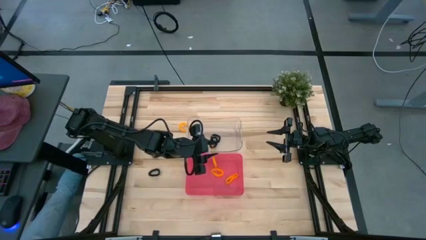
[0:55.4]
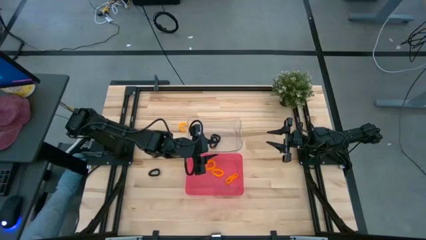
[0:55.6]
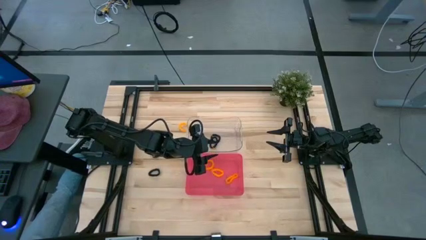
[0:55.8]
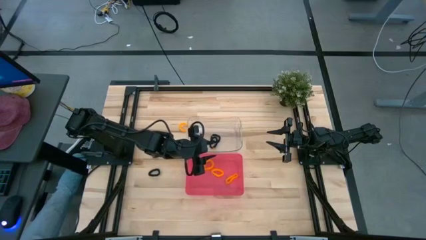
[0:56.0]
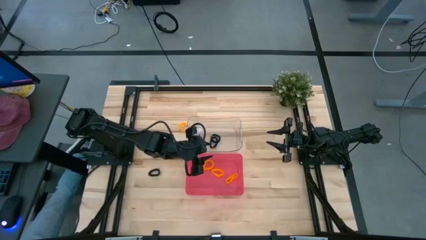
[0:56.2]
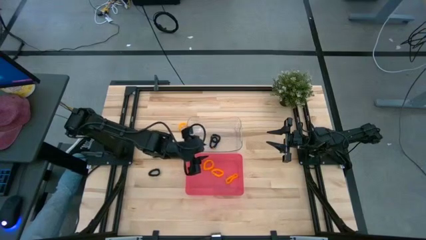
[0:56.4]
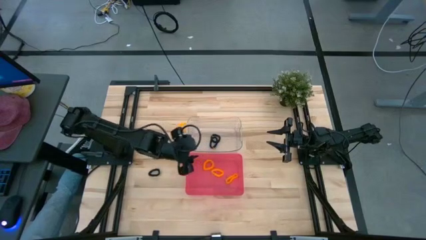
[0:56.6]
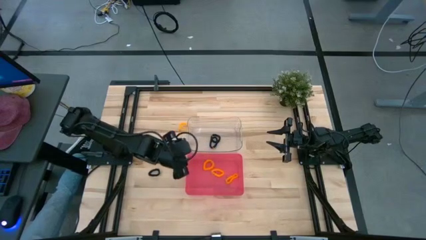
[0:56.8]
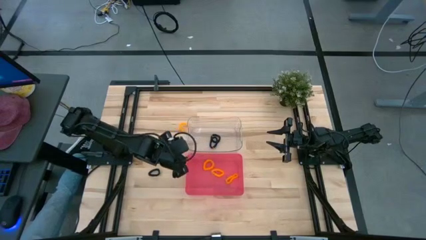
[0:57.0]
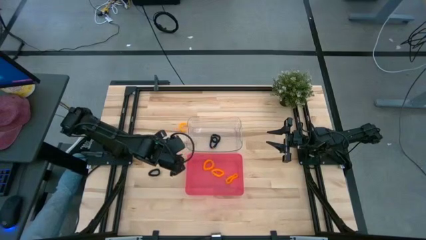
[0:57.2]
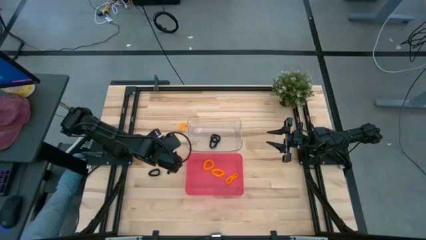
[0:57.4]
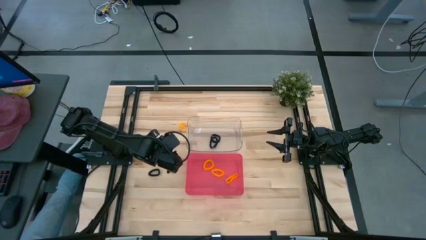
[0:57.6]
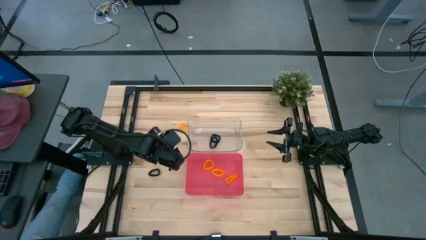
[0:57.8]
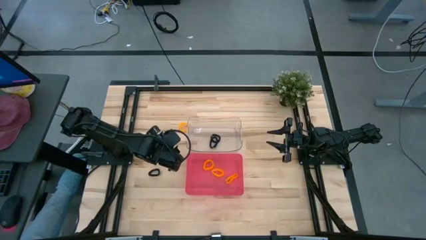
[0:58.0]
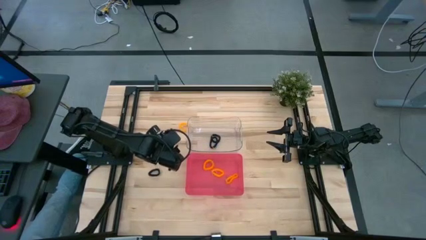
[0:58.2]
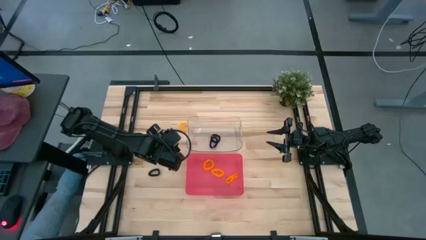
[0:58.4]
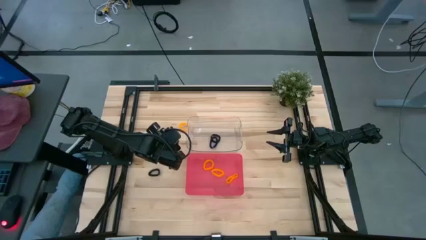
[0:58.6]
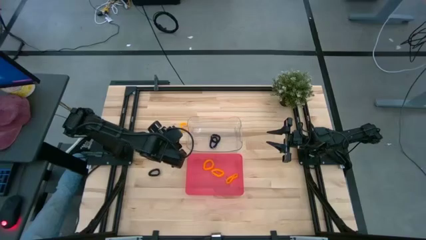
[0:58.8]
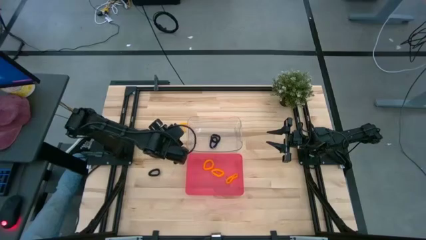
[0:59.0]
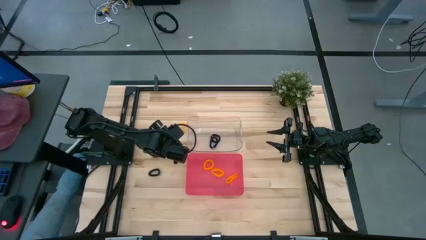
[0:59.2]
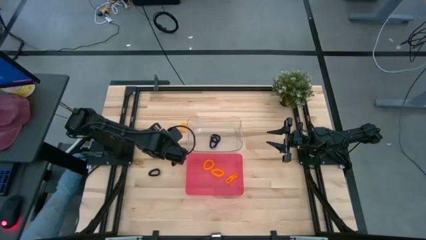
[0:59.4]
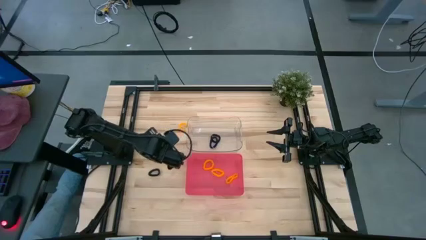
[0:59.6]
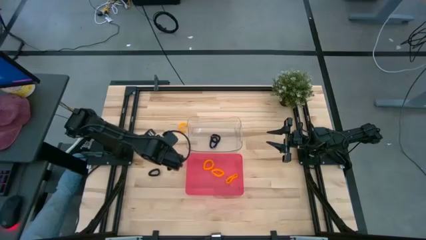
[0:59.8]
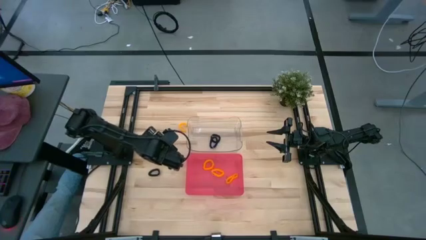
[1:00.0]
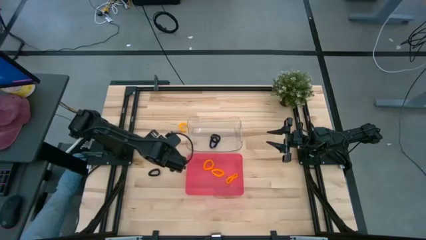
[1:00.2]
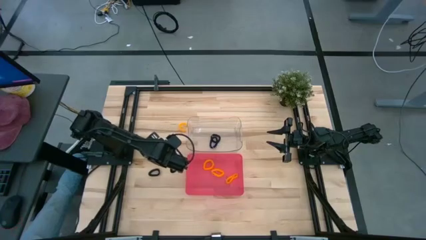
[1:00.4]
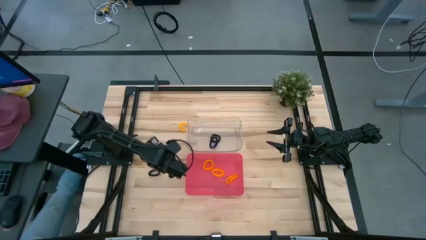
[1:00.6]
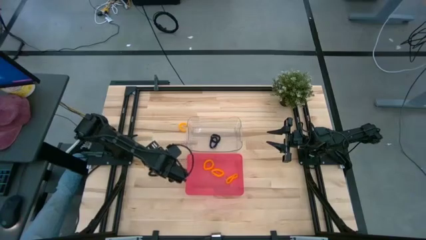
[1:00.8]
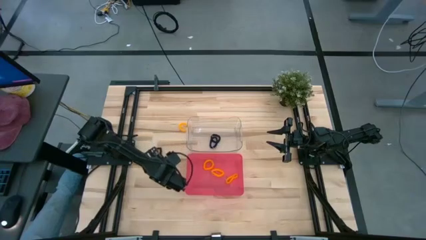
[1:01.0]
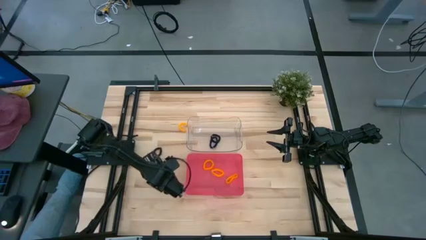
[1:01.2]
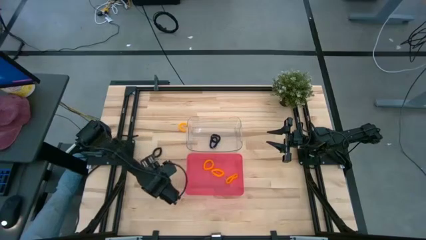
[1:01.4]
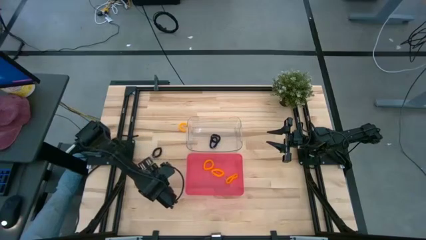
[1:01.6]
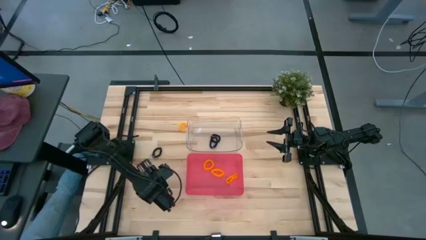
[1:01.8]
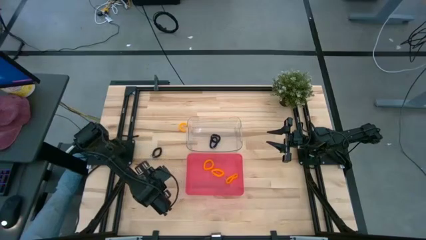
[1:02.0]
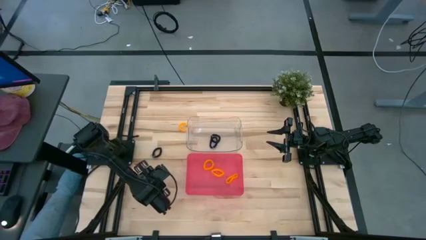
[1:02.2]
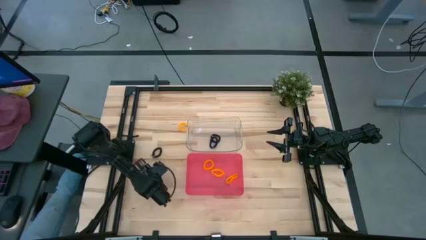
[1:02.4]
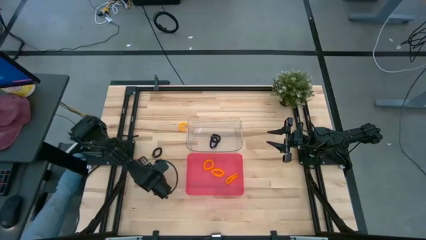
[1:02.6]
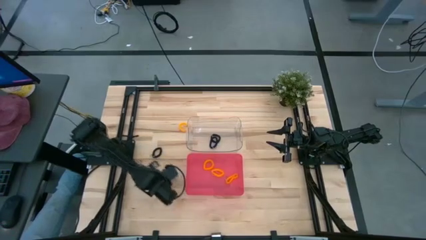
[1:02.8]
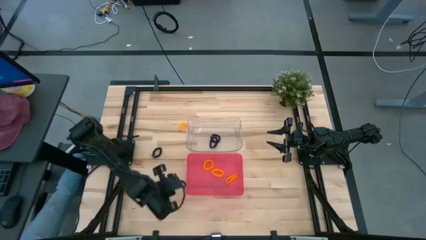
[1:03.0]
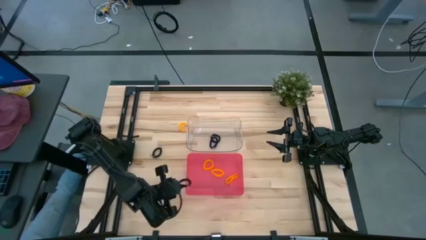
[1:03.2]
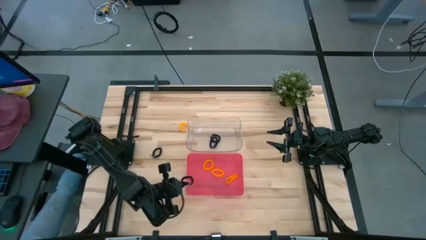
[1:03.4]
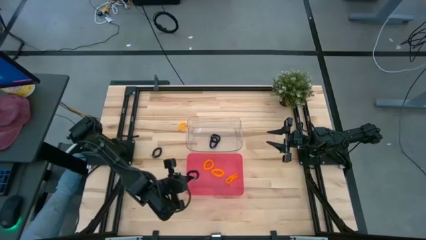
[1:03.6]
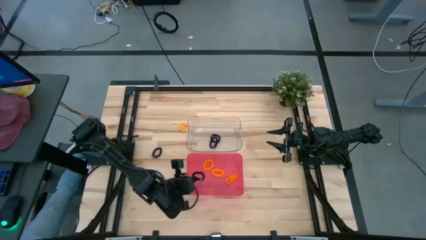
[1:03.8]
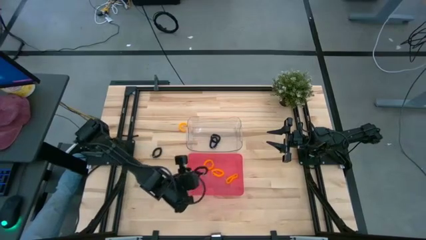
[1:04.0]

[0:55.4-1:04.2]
Task: Sort spring keychains
Put the black spring keychain into the transparent bin

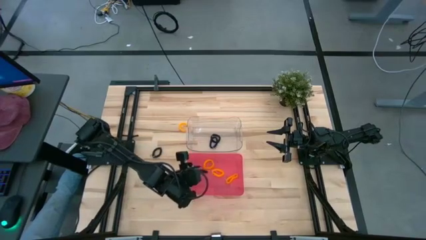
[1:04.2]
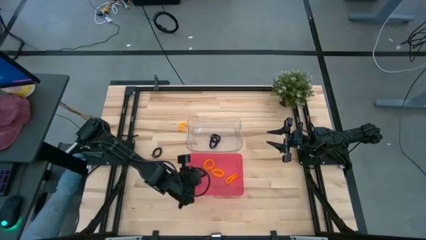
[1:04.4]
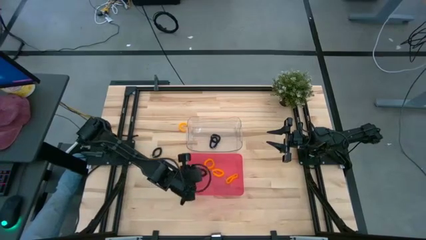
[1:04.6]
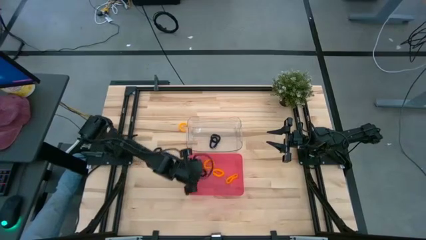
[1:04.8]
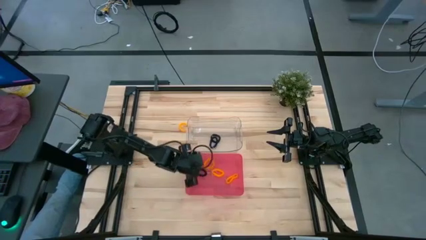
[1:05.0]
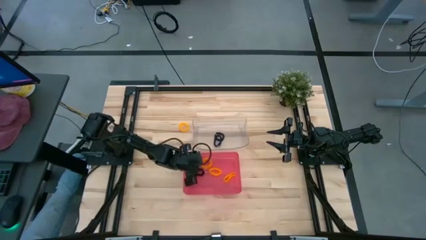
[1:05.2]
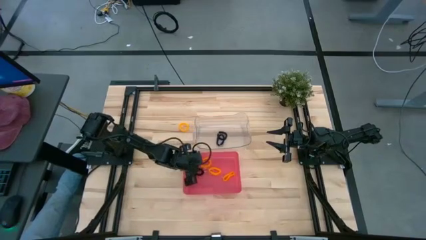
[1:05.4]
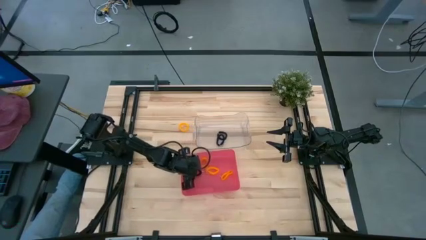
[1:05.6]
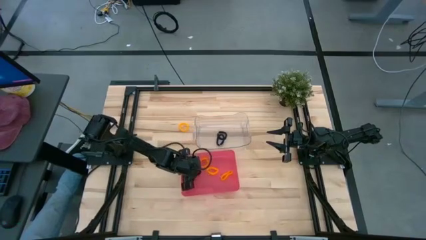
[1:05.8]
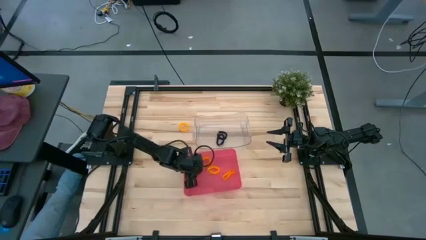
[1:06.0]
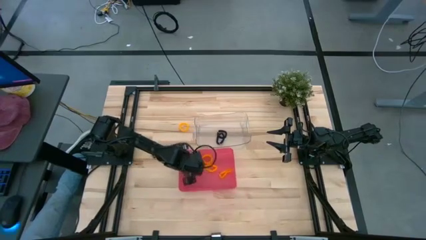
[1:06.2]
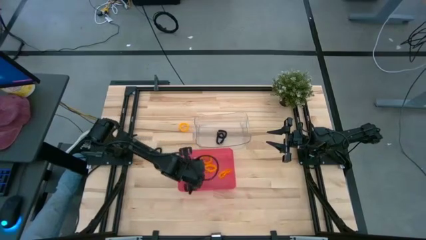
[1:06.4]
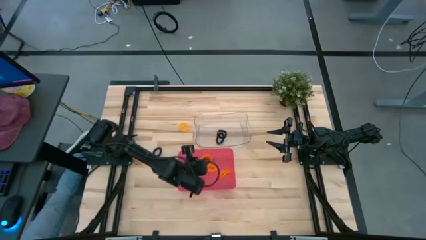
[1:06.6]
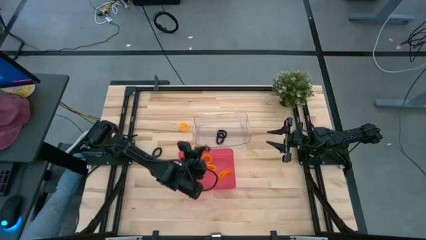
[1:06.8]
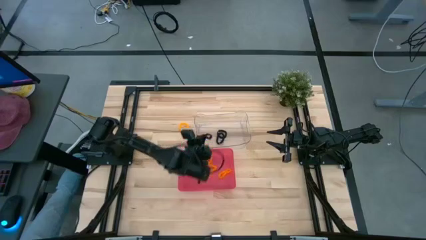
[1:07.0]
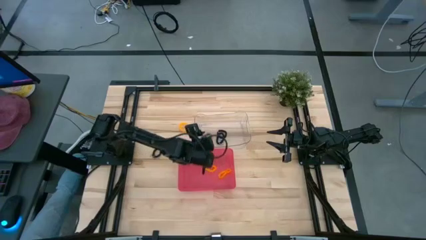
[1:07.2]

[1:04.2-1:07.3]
Put the black spring keychain into the transparent bin

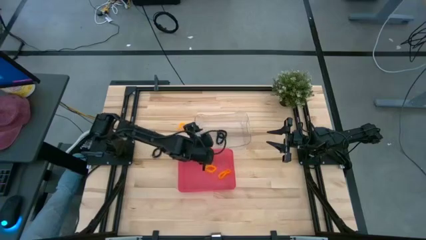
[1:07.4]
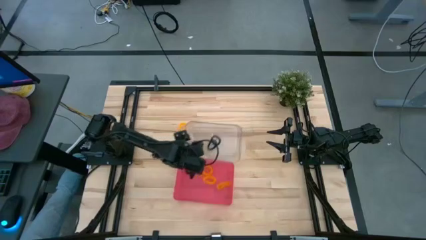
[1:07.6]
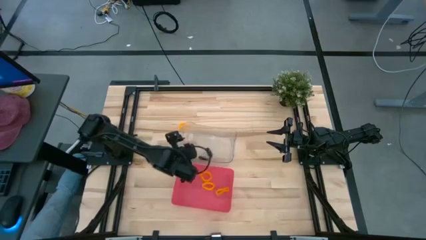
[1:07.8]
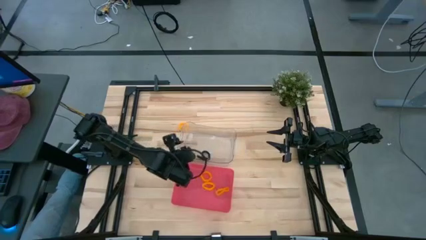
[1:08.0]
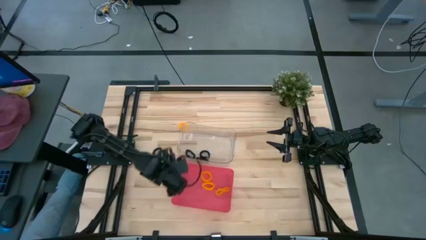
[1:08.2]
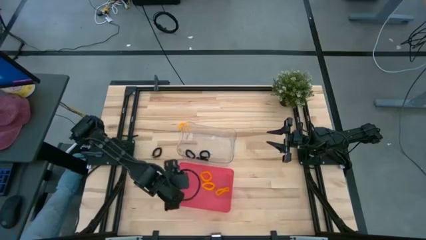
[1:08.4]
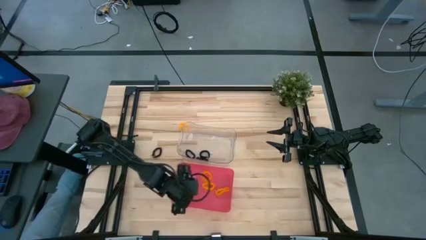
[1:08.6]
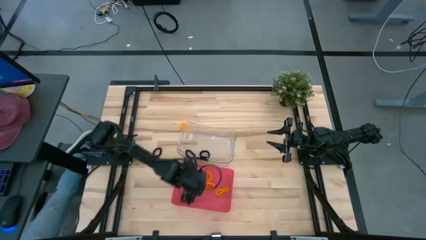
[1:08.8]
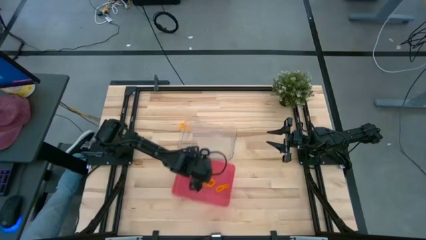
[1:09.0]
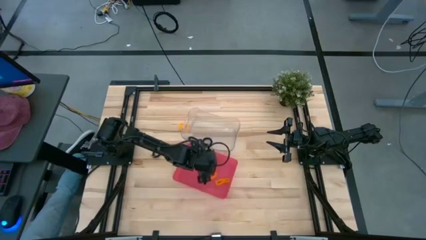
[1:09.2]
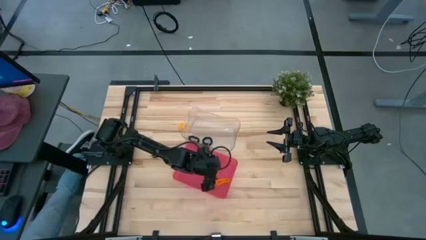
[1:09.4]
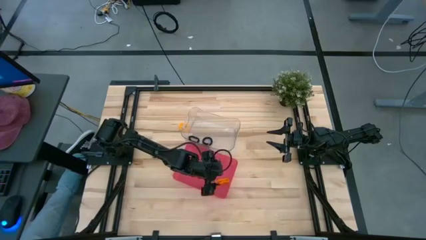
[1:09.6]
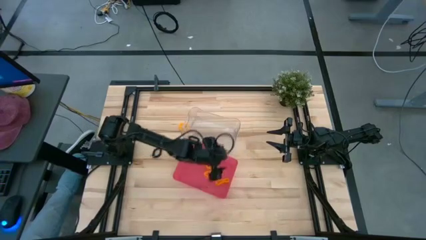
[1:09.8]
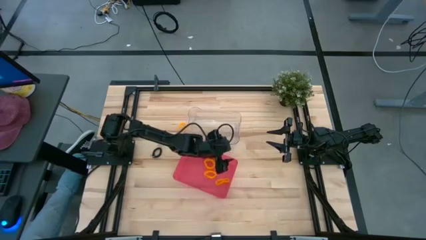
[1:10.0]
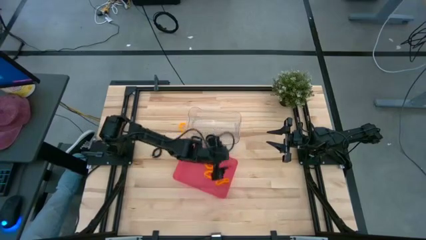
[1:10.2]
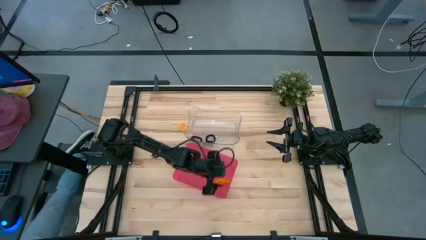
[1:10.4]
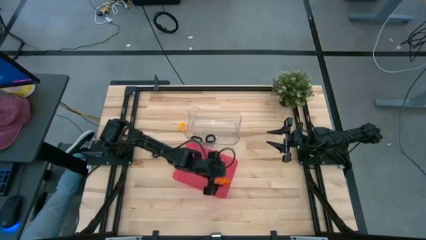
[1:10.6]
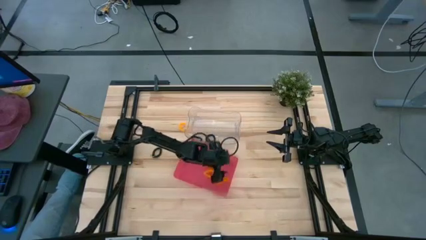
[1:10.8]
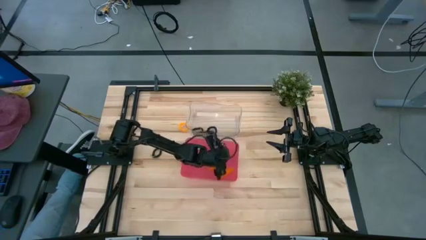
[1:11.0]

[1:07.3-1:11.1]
Adjust the bins on the table
